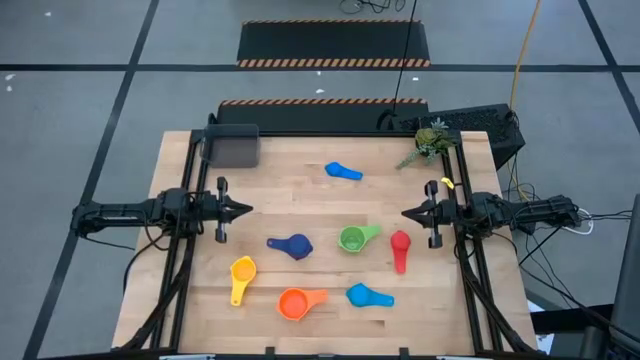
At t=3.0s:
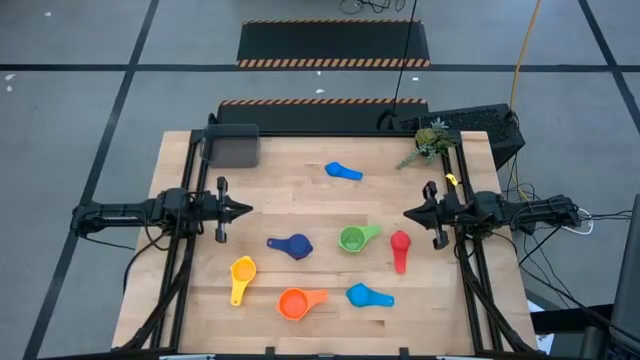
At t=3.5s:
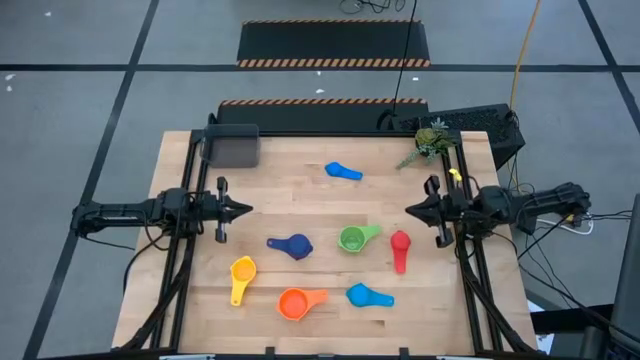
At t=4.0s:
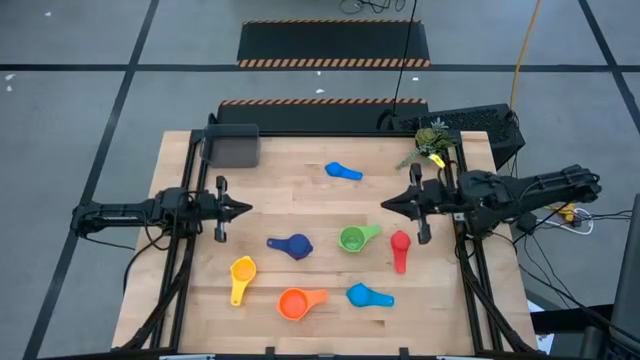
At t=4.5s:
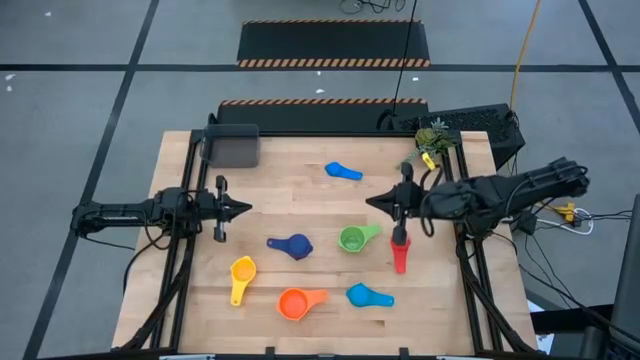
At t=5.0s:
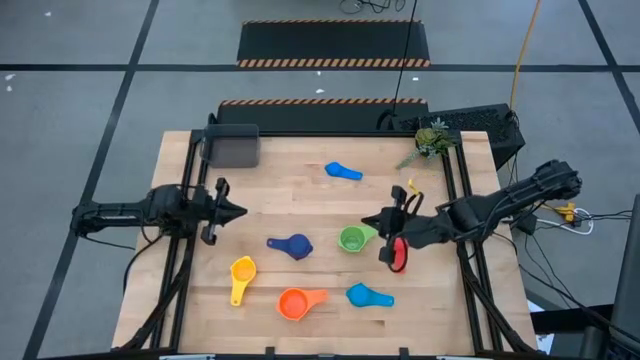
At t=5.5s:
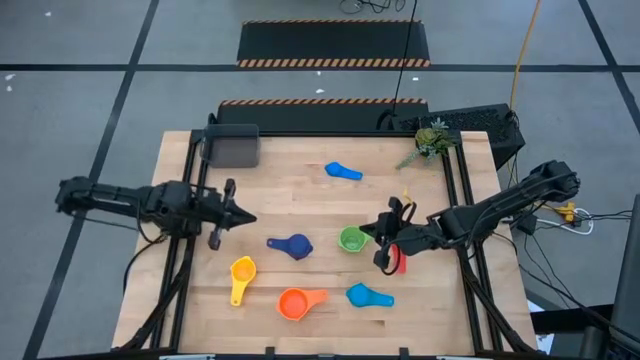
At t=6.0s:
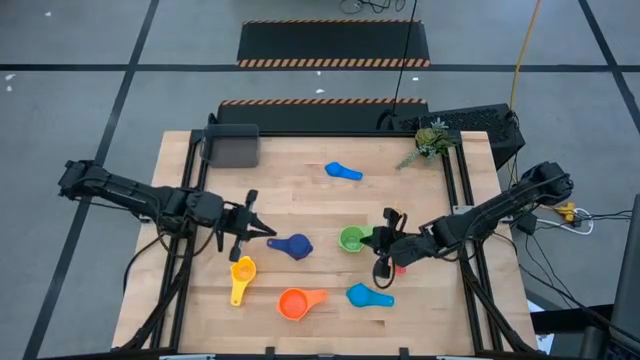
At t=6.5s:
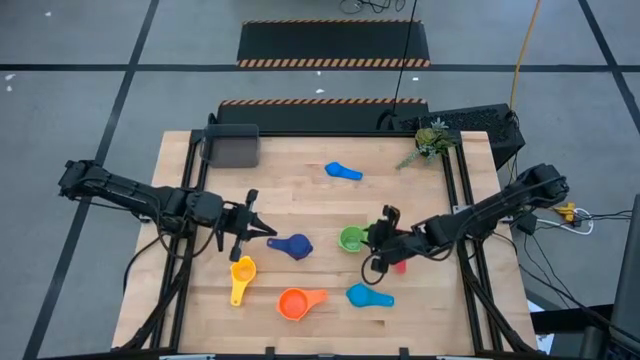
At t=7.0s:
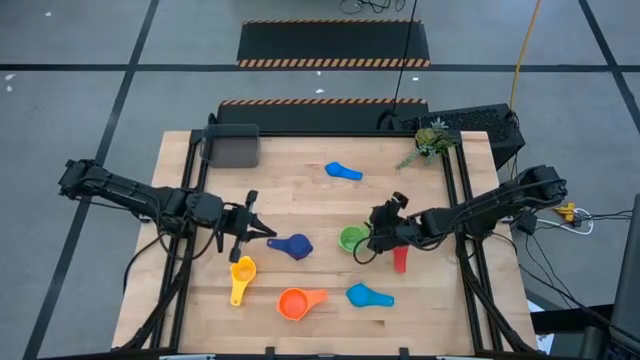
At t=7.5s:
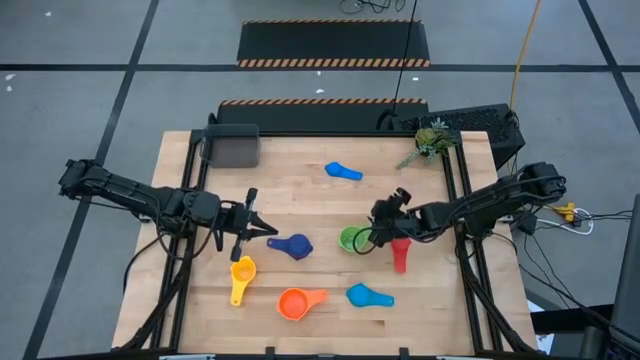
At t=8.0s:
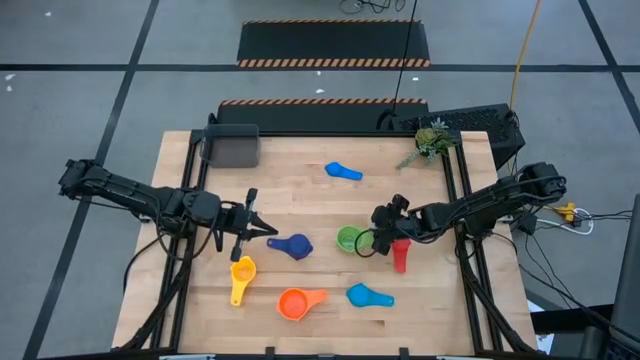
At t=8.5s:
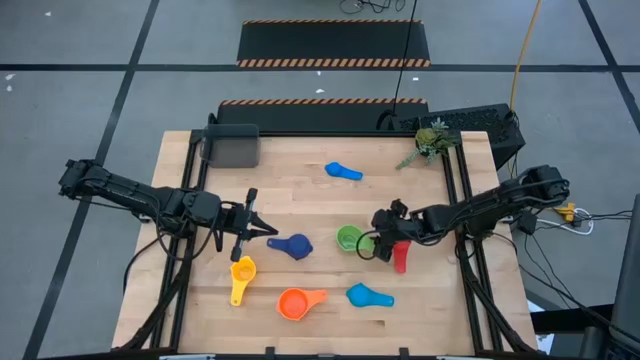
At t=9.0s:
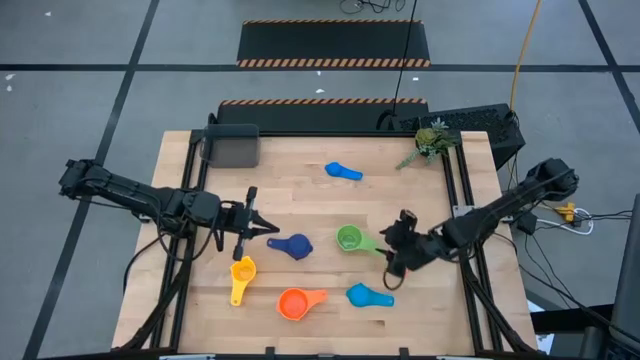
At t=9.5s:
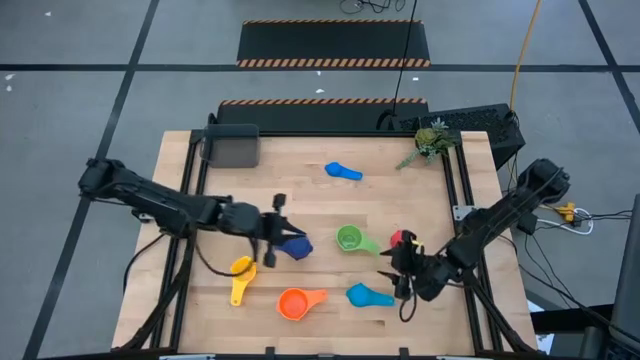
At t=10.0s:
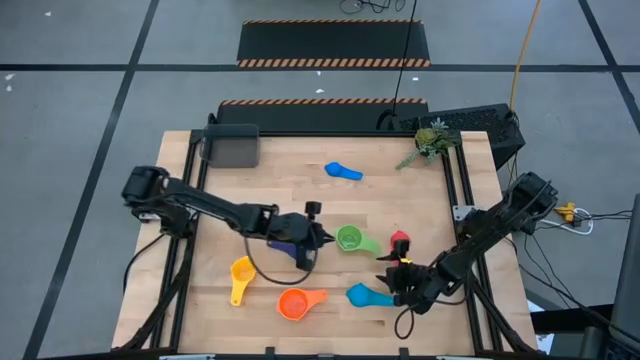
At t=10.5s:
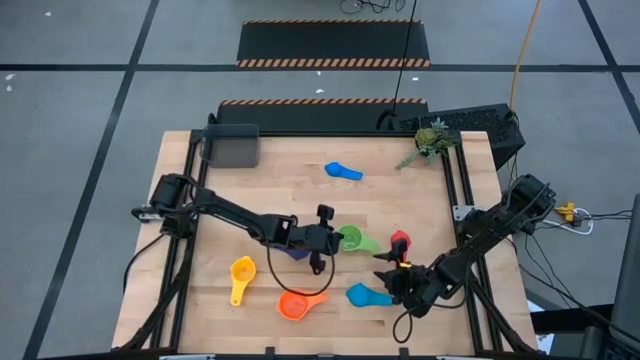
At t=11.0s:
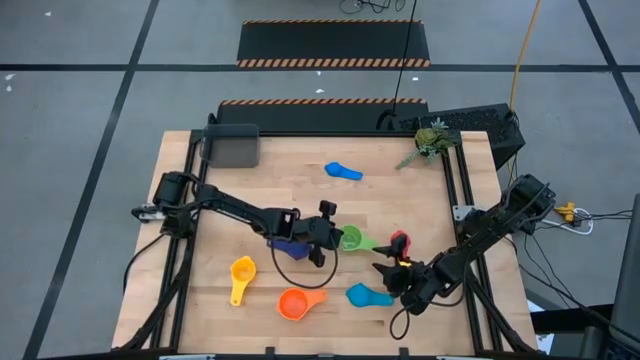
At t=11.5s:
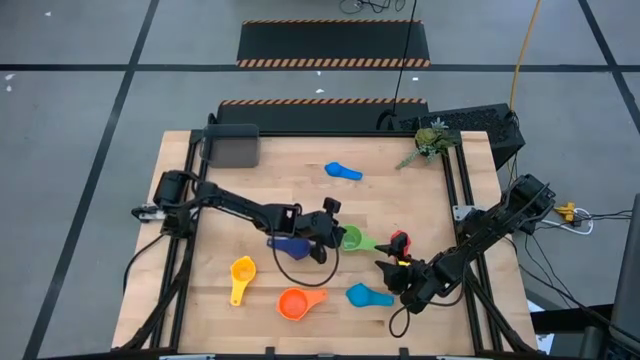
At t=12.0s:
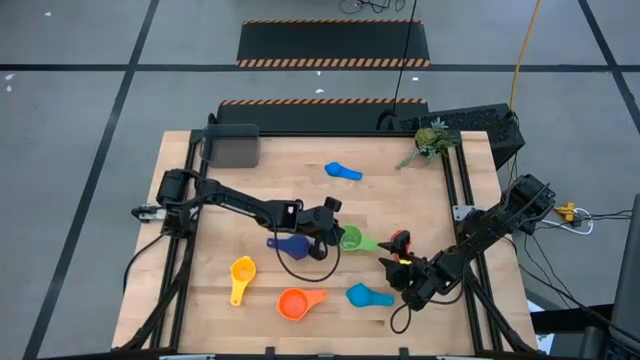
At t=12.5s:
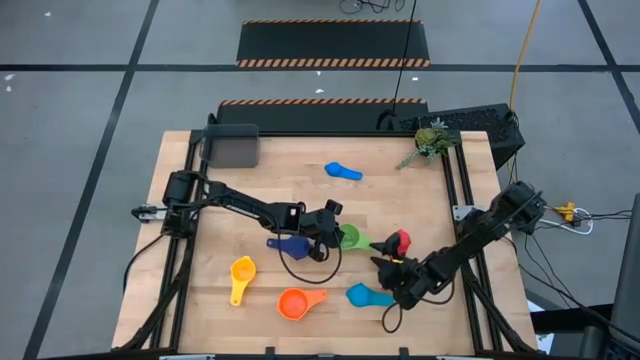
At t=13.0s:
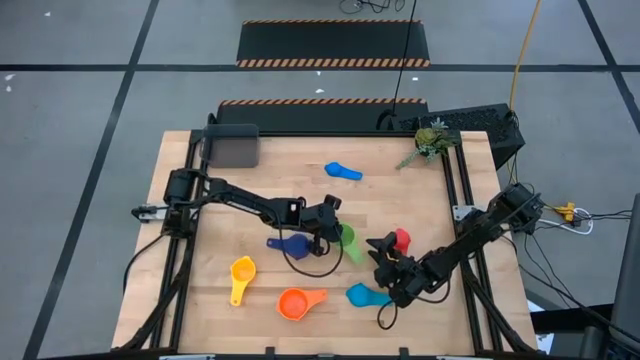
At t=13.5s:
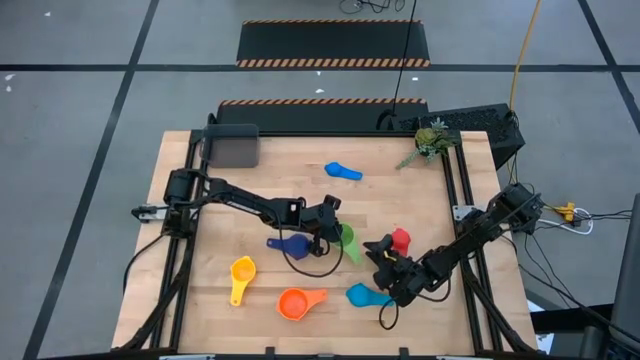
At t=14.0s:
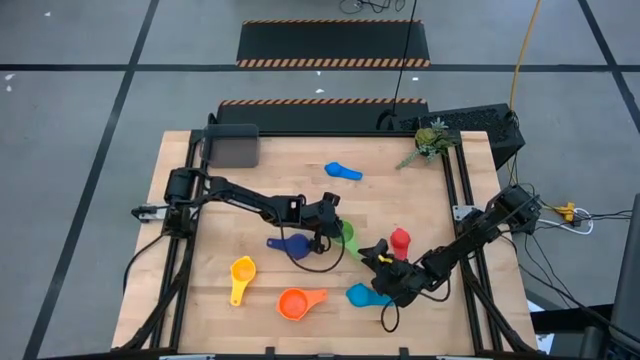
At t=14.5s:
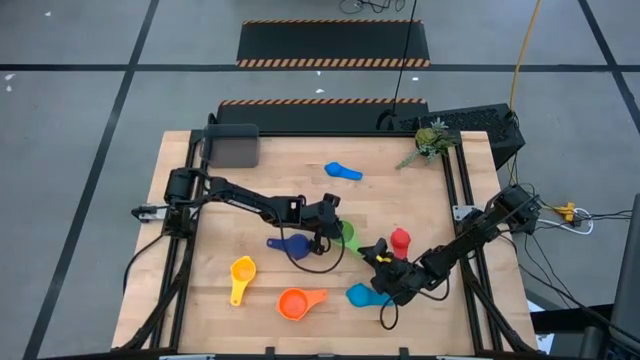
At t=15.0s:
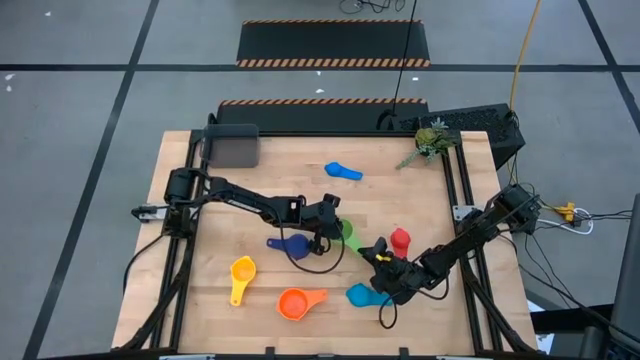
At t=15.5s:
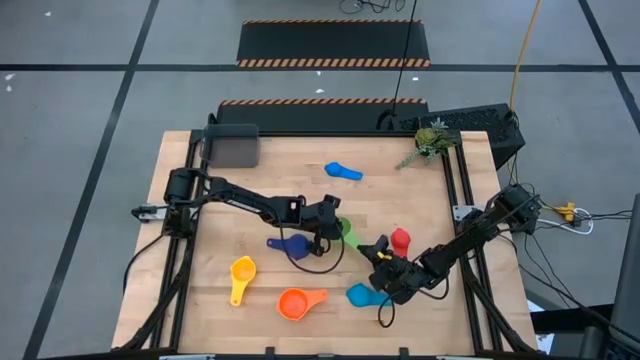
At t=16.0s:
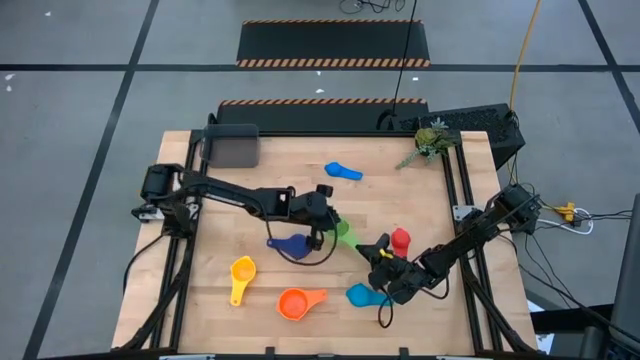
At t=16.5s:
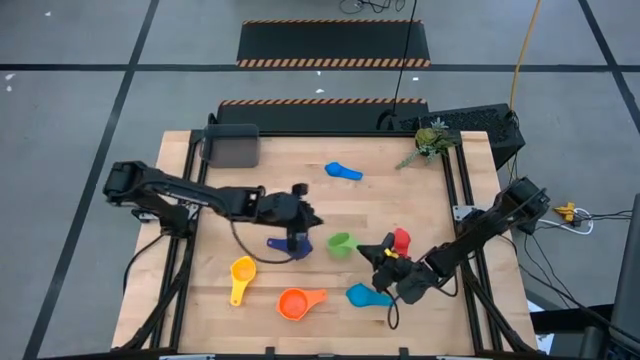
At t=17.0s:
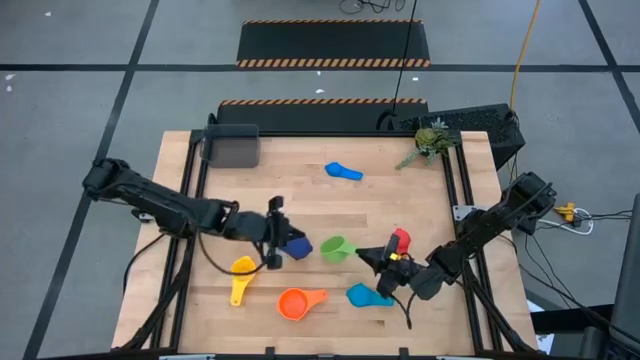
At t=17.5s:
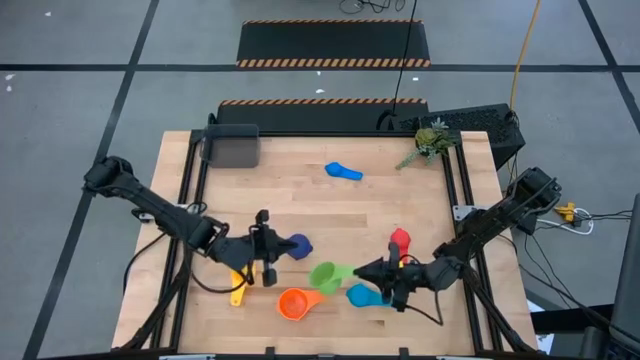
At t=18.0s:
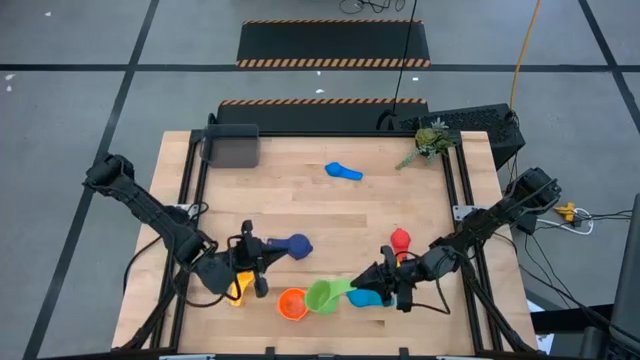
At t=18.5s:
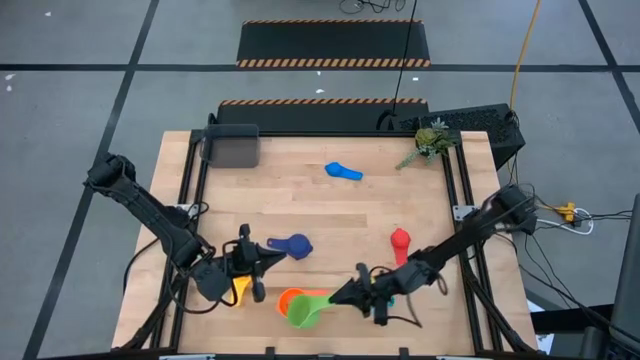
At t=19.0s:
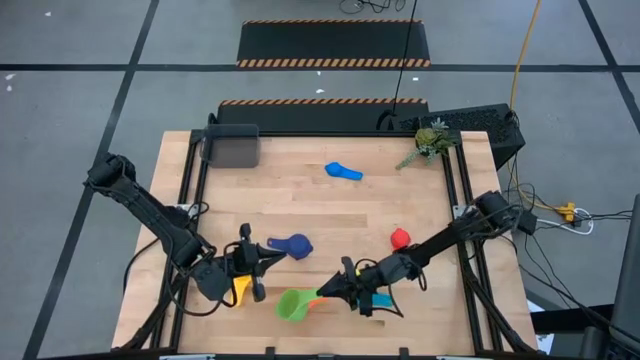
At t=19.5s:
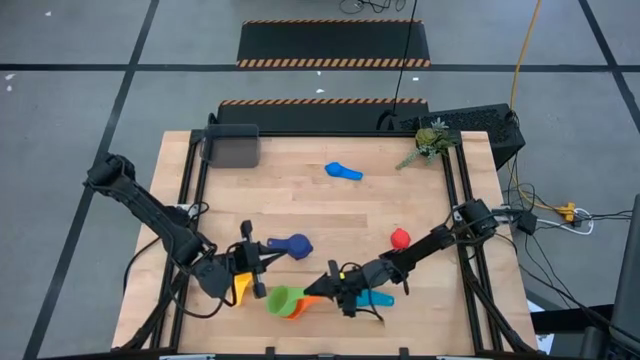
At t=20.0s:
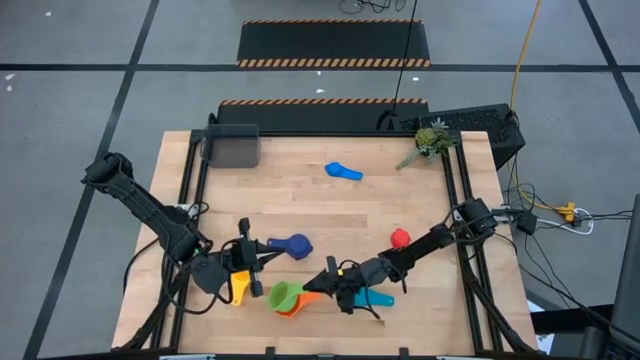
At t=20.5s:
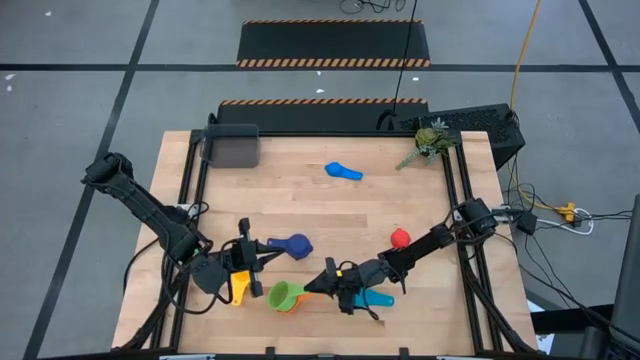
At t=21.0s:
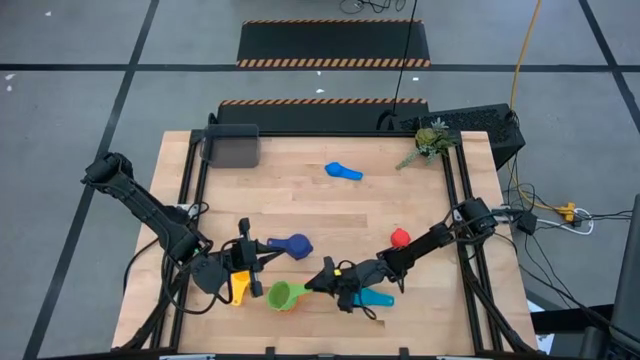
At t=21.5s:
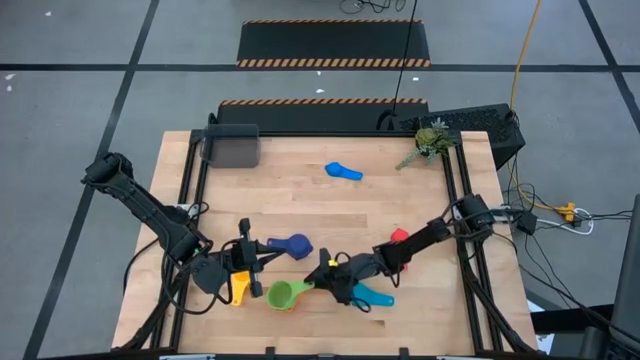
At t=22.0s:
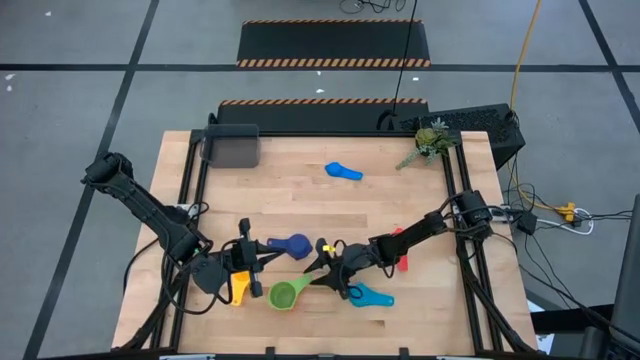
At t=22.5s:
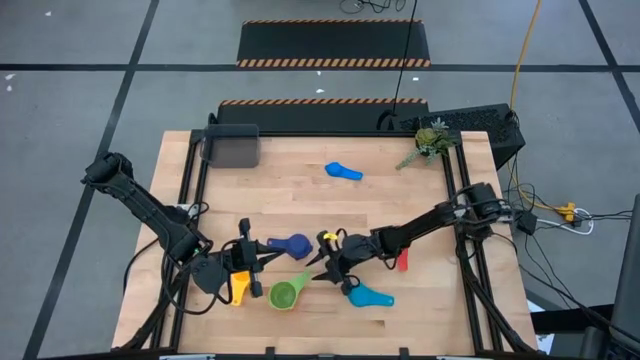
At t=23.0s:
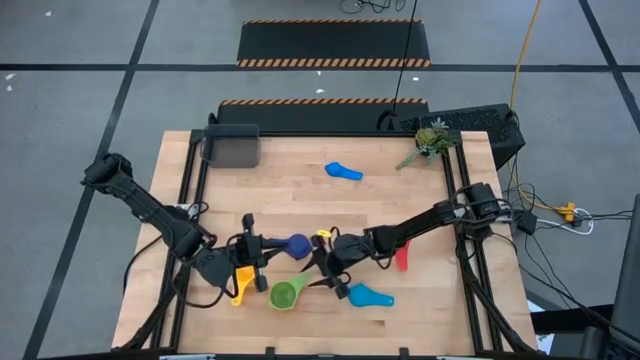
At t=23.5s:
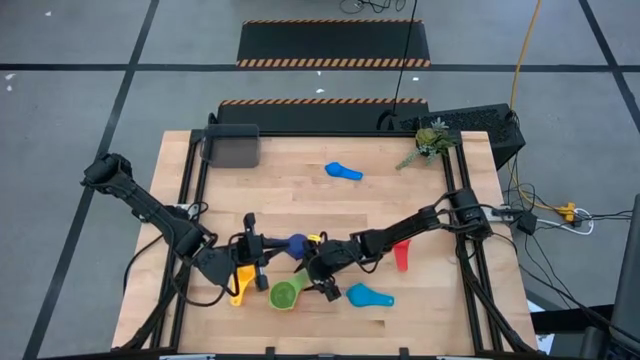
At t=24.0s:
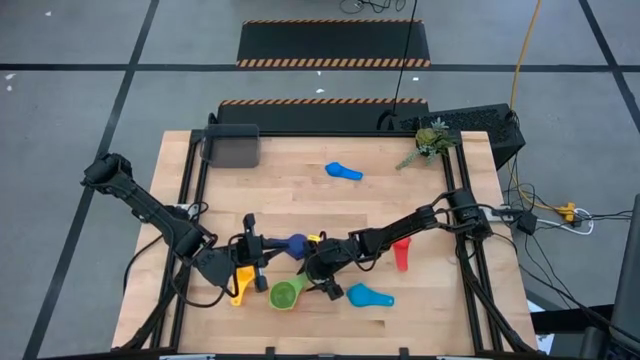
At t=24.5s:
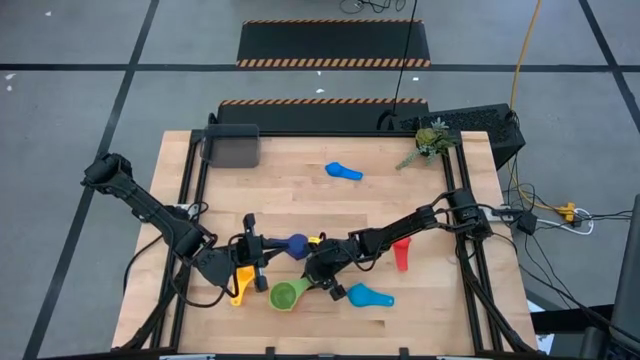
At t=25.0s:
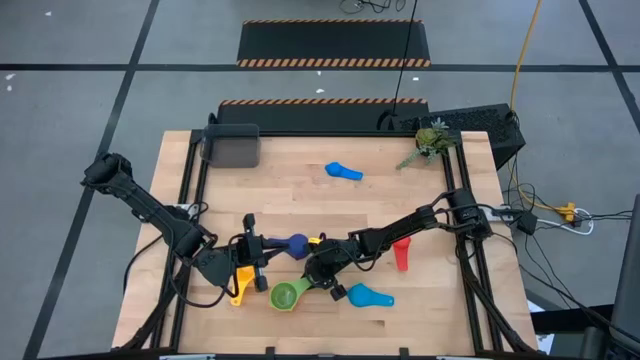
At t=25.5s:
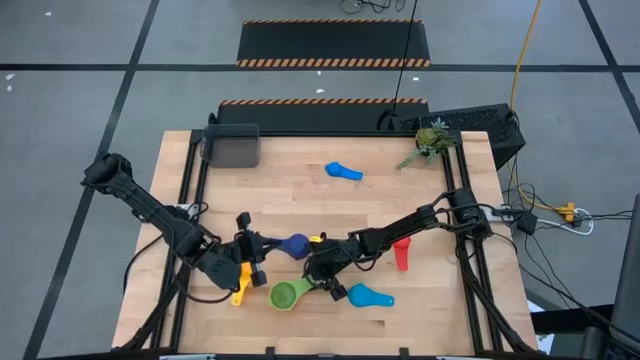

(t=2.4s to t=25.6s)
Task: Nest measuring cups in basket
Stack the green measuring cup on top of the orange measuring cup
